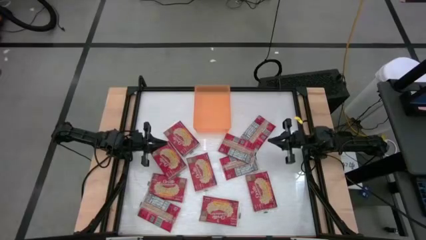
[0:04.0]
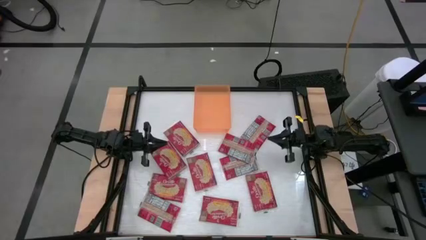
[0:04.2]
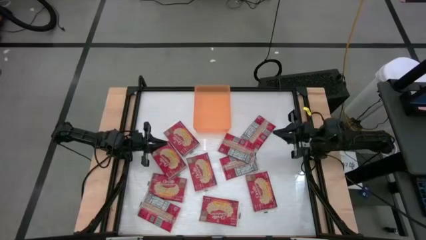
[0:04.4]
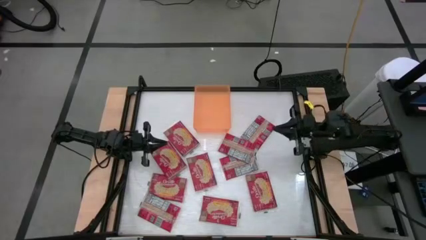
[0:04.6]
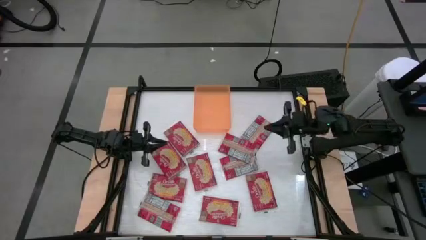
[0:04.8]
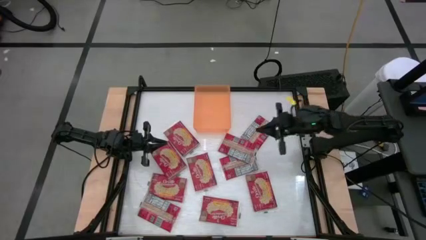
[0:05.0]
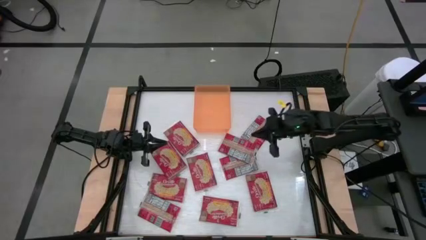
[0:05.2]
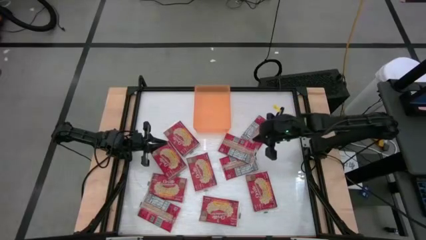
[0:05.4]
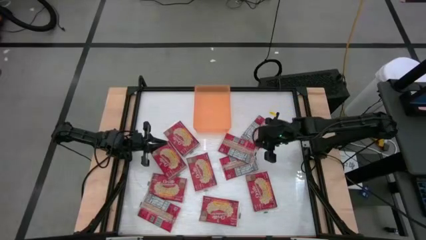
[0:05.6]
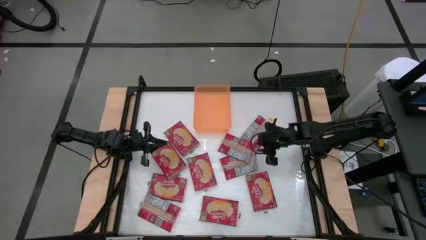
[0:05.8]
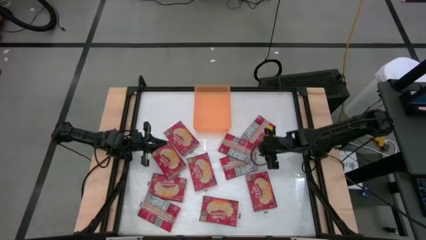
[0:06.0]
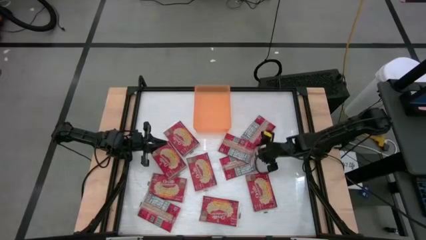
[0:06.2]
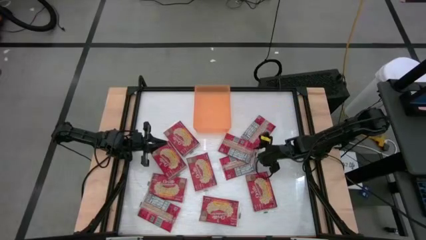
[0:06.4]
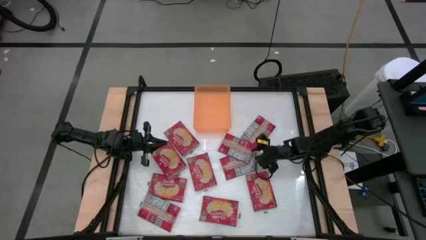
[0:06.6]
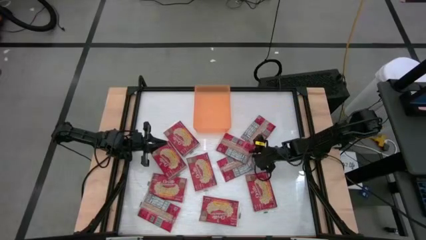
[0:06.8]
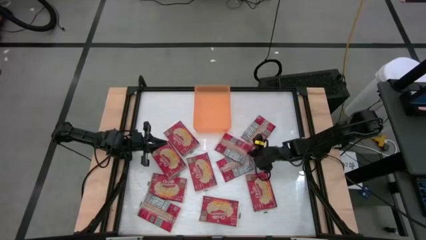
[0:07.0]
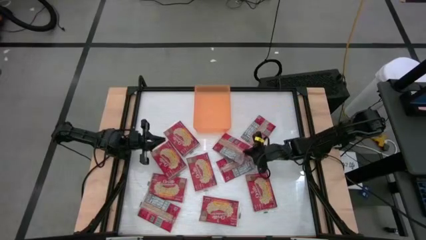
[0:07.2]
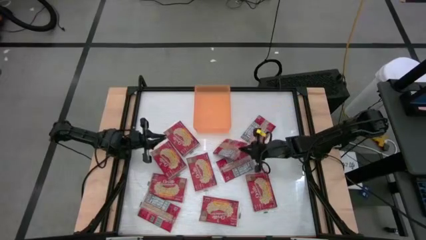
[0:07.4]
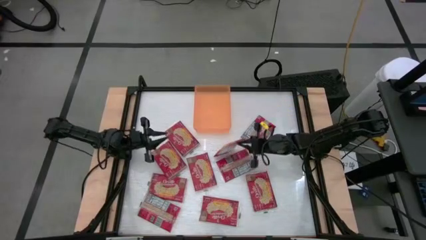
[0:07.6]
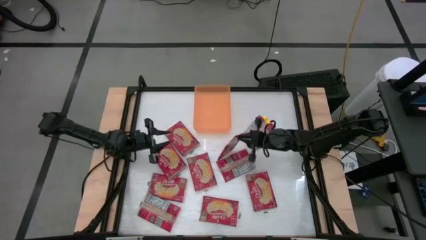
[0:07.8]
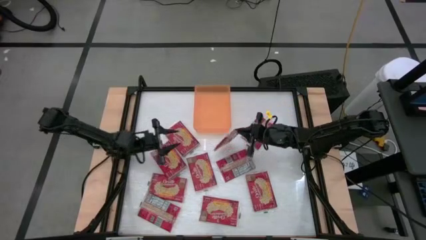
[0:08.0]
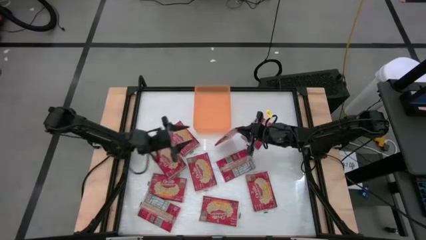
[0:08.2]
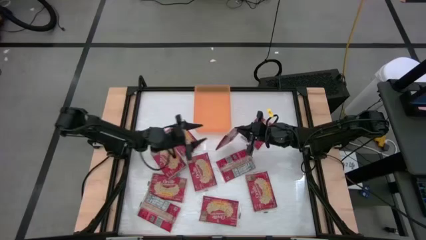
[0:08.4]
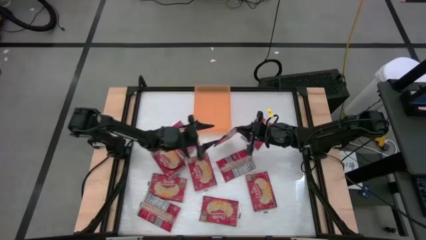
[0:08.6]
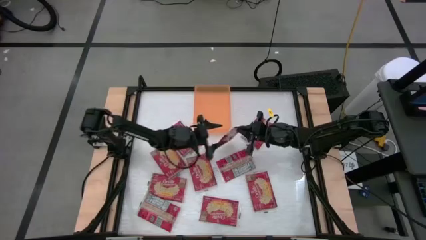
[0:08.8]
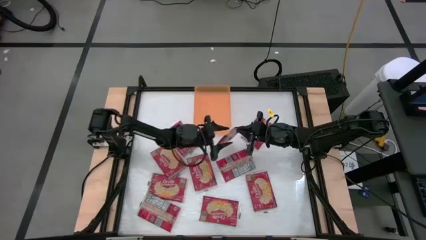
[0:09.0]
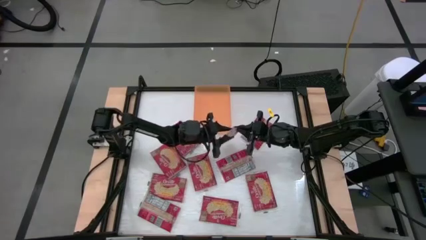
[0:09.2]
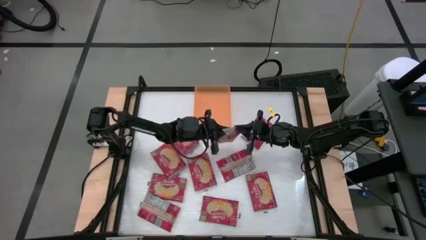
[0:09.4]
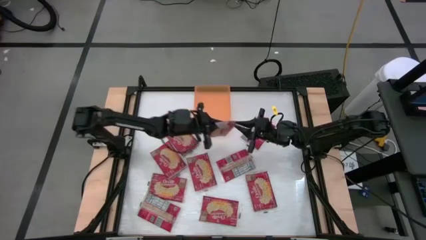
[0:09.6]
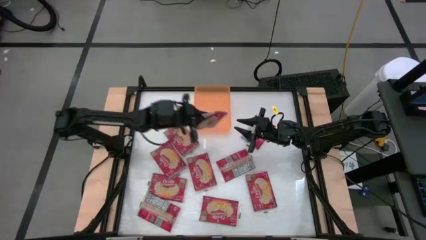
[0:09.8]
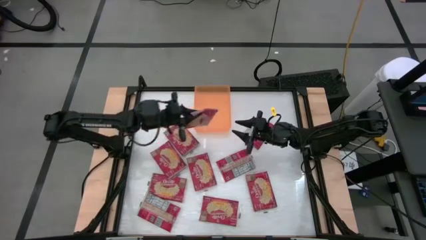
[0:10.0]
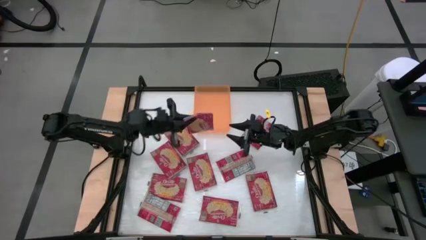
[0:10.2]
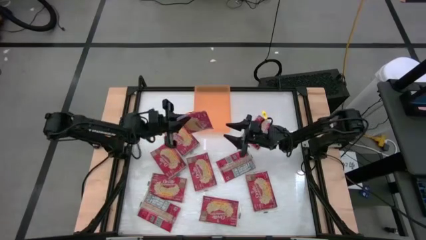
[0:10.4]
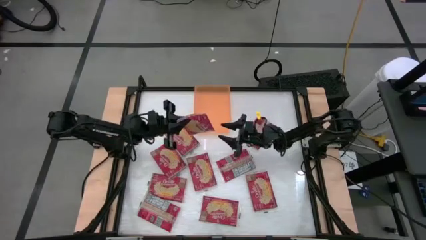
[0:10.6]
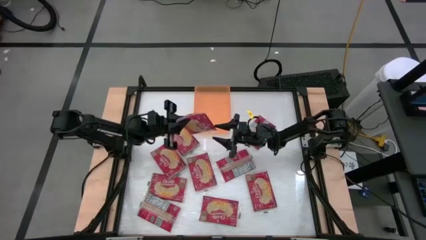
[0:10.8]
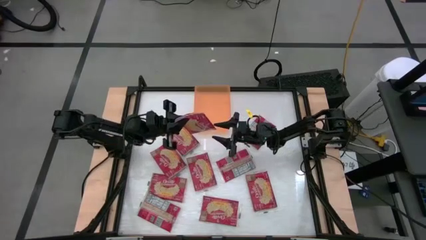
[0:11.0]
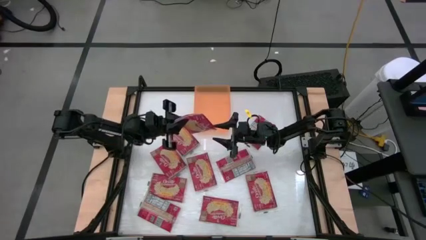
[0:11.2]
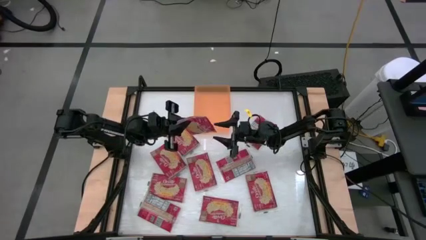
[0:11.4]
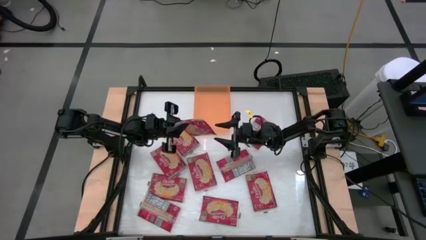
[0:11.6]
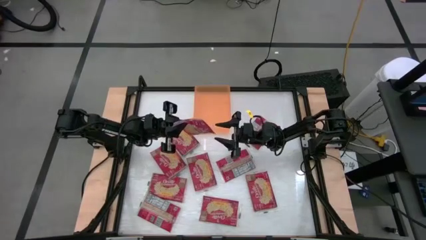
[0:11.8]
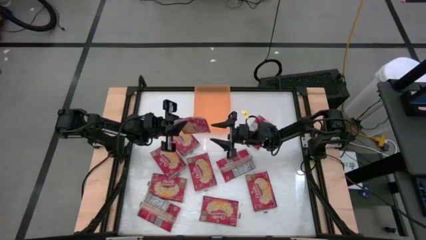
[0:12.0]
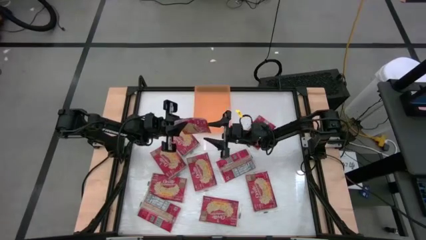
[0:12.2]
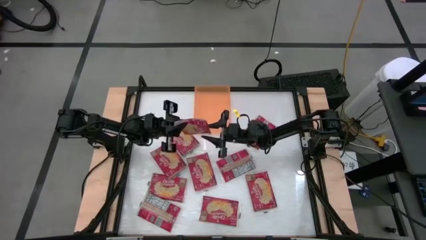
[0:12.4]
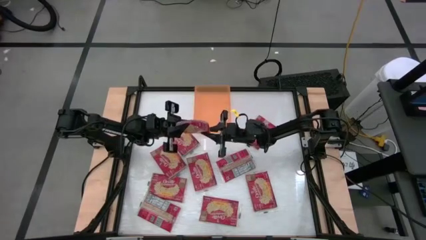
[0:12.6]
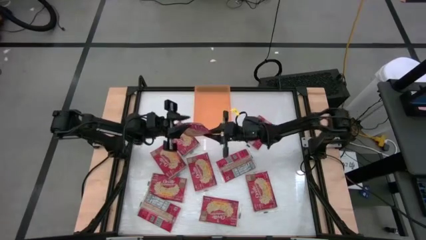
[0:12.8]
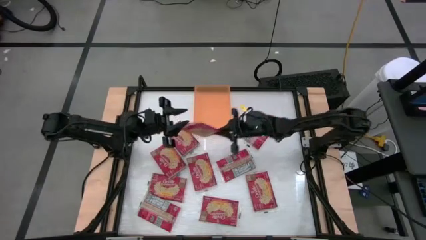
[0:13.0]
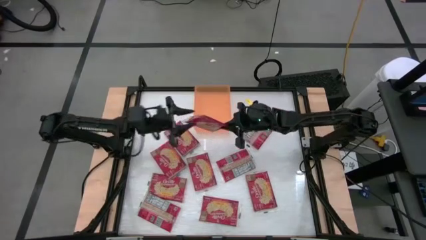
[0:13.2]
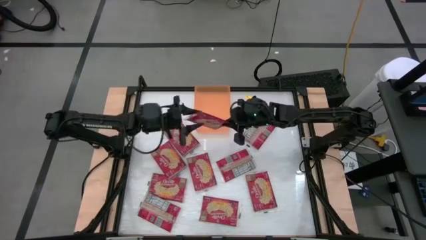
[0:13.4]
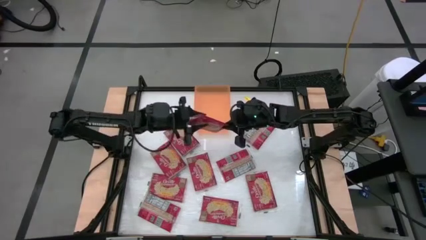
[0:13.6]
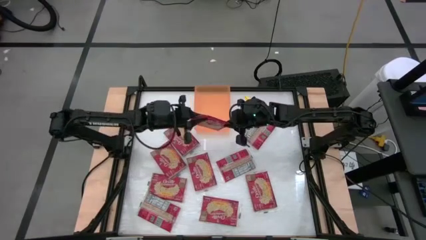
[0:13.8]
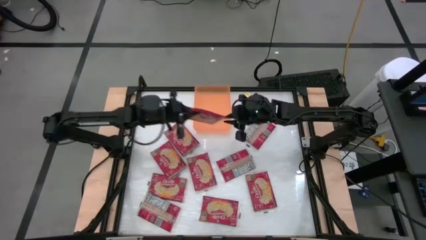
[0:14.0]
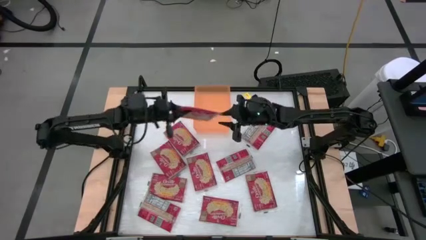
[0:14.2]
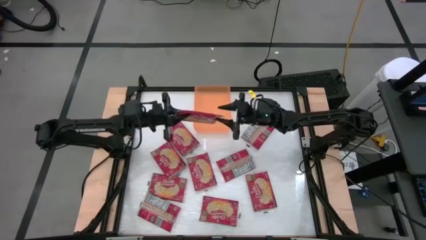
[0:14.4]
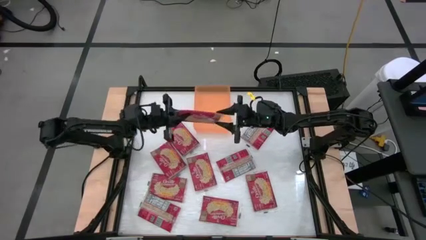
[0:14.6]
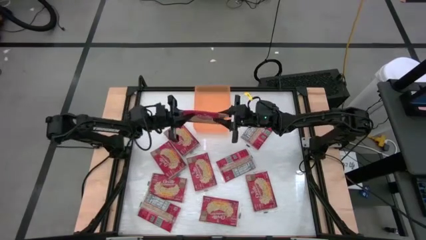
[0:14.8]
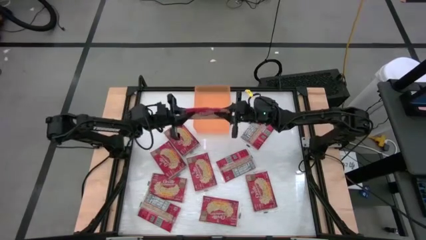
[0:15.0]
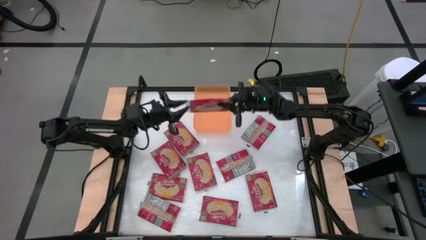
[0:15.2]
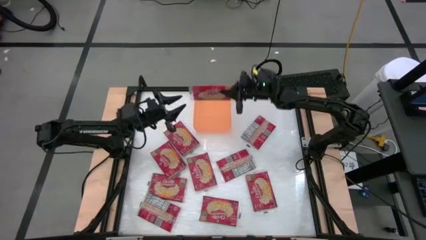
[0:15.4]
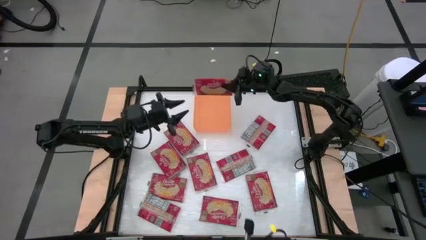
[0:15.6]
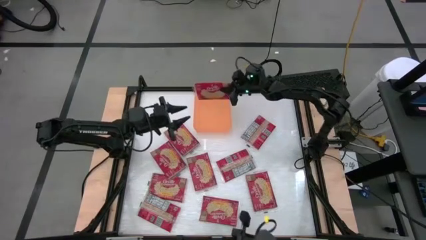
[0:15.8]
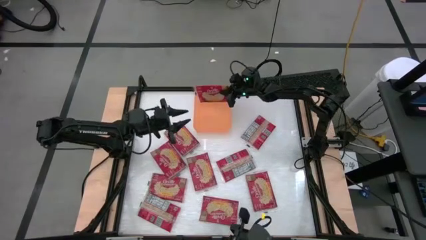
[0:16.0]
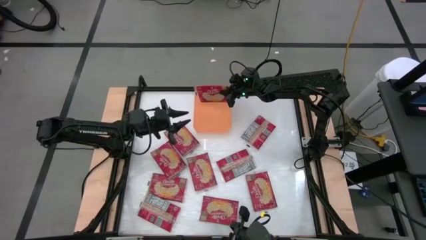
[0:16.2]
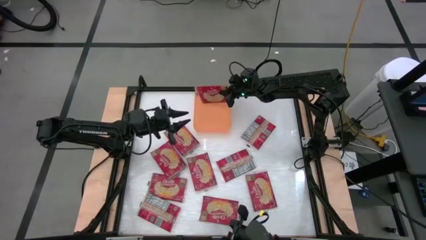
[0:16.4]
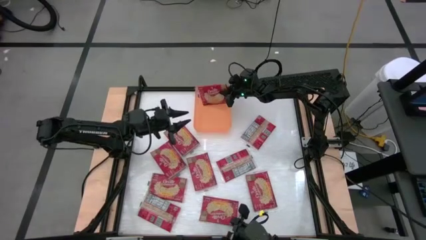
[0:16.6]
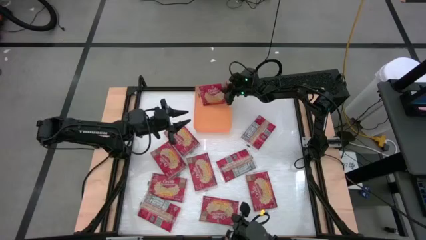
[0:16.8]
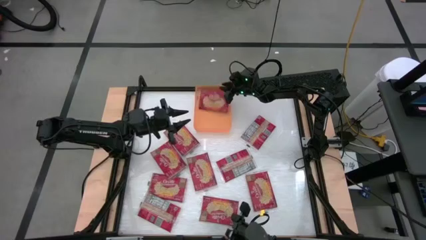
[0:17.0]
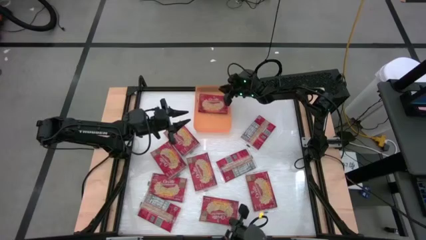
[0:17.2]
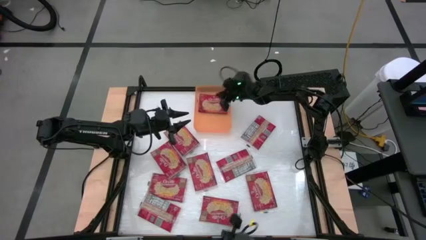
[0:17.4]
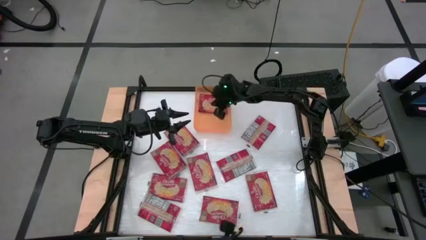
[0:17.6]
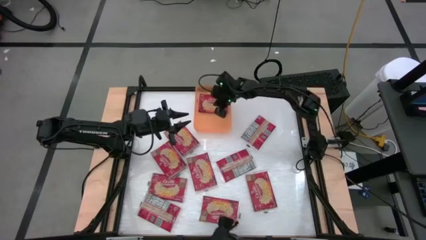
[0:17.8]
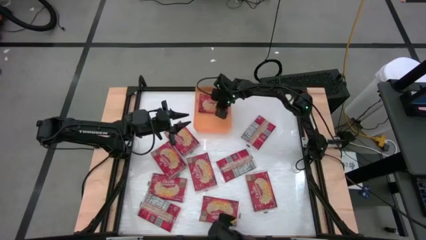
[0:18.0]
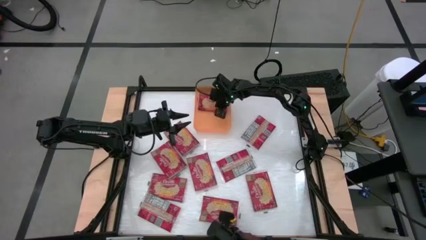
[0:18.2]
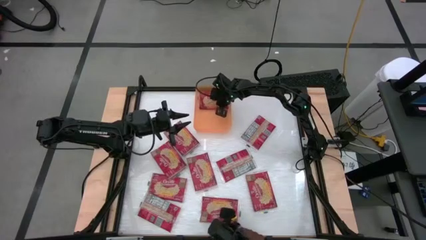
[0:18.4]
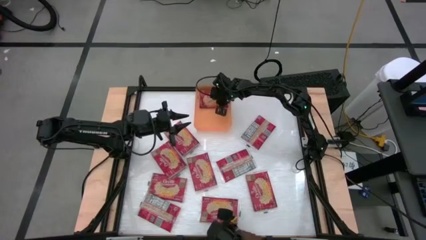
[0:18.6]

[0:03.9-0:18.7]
Task: Sort popcorn bags into baskets
Put the red popcorn bag into the orange bin
